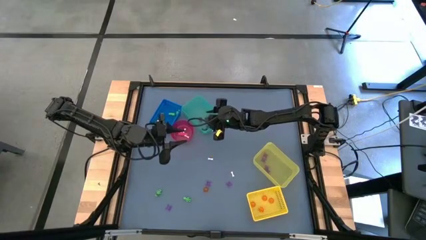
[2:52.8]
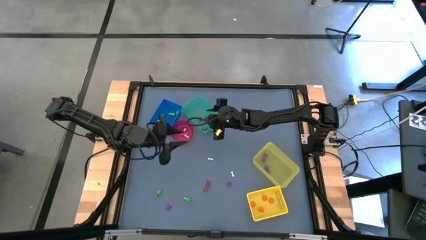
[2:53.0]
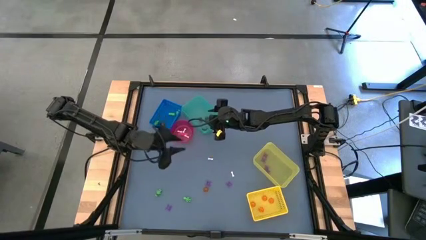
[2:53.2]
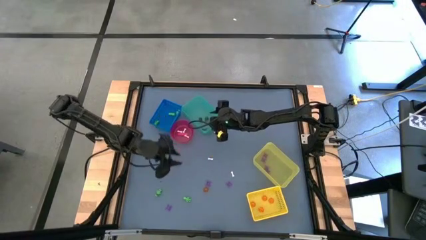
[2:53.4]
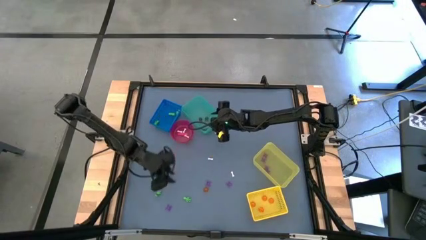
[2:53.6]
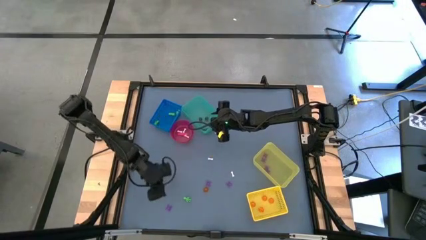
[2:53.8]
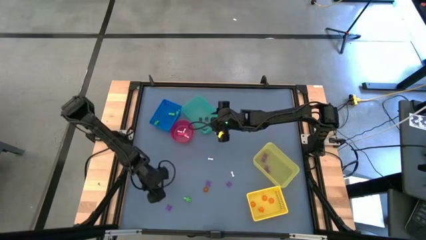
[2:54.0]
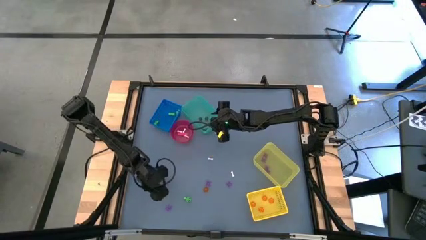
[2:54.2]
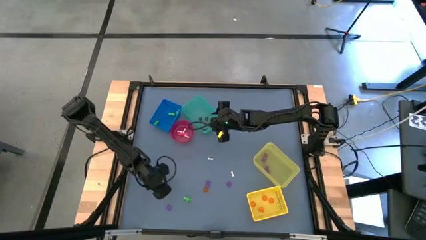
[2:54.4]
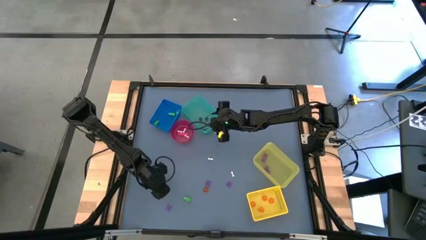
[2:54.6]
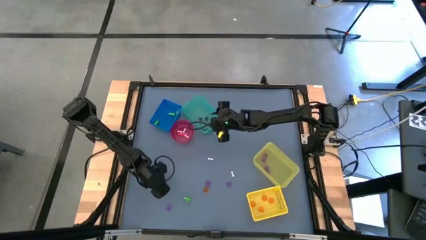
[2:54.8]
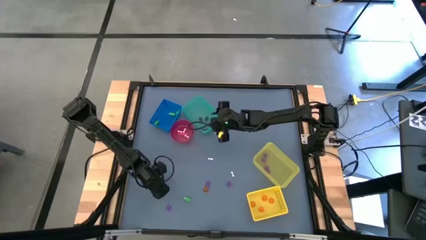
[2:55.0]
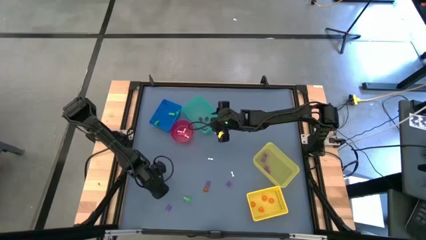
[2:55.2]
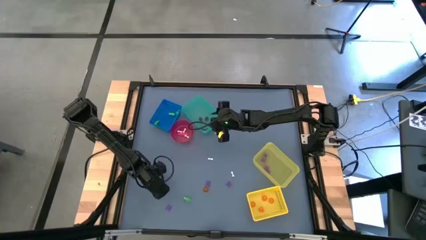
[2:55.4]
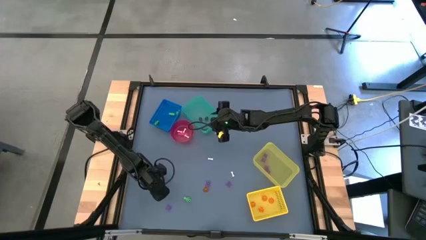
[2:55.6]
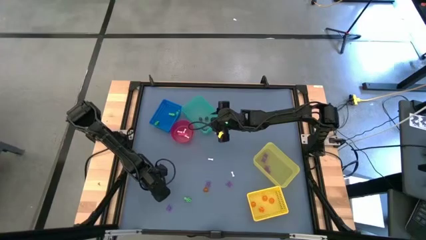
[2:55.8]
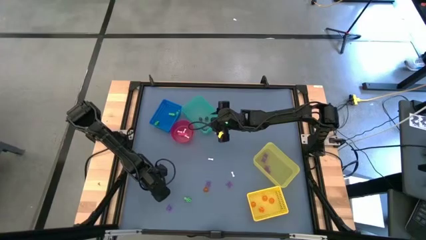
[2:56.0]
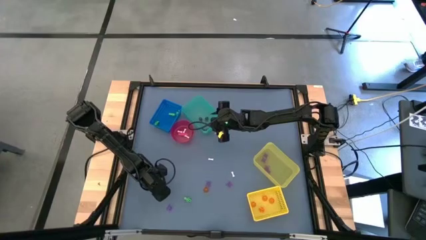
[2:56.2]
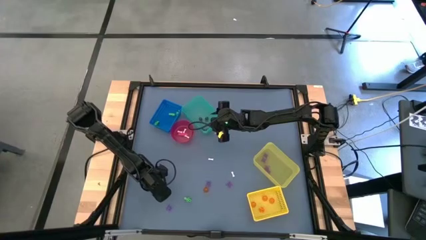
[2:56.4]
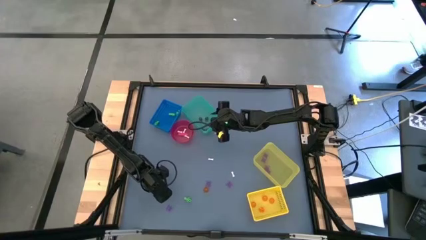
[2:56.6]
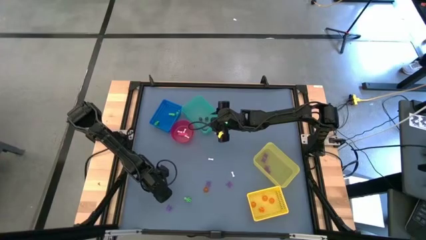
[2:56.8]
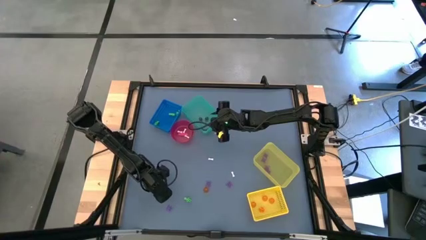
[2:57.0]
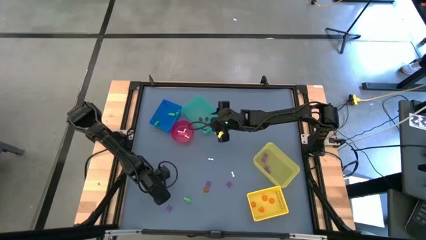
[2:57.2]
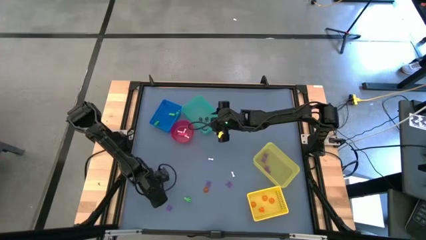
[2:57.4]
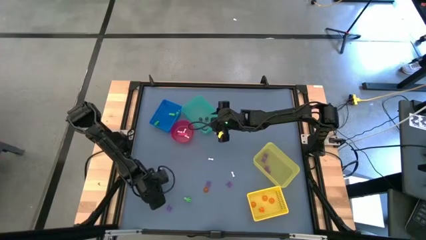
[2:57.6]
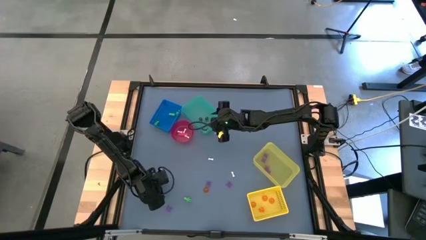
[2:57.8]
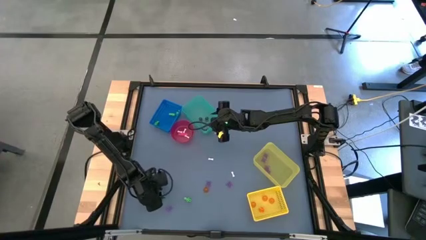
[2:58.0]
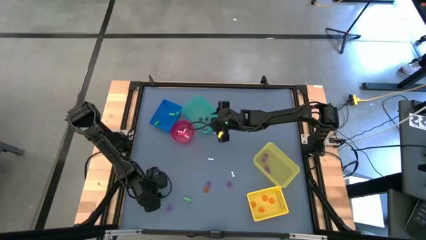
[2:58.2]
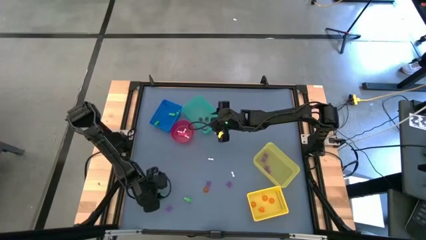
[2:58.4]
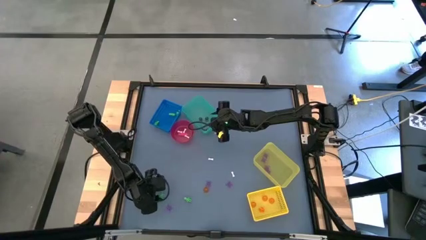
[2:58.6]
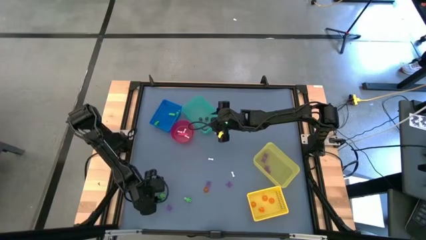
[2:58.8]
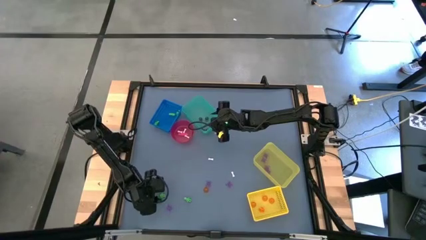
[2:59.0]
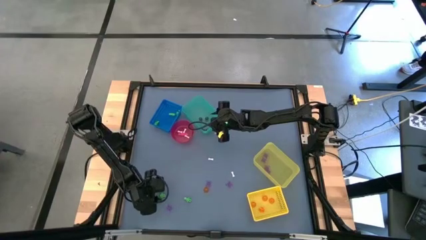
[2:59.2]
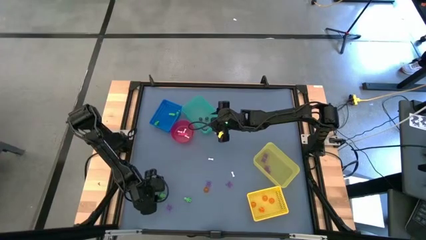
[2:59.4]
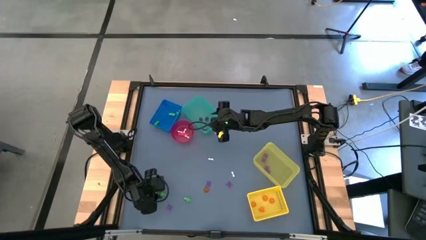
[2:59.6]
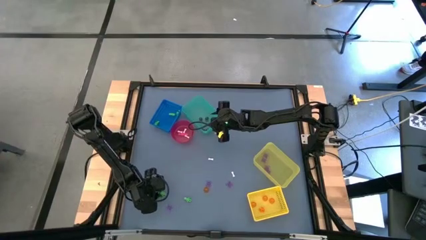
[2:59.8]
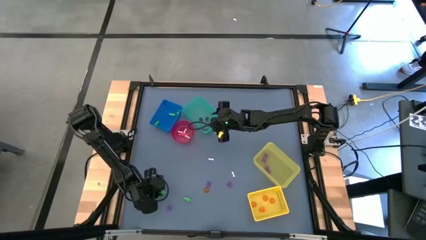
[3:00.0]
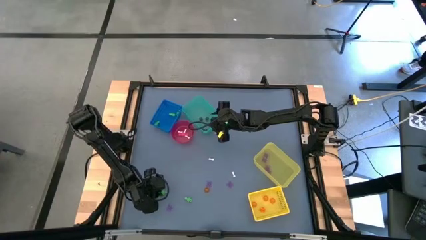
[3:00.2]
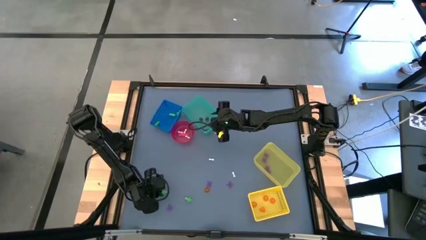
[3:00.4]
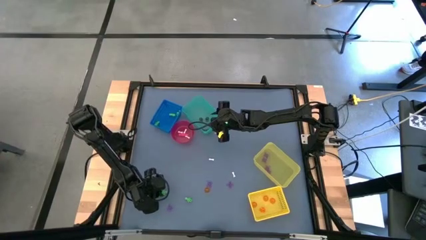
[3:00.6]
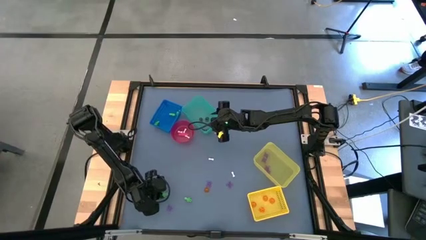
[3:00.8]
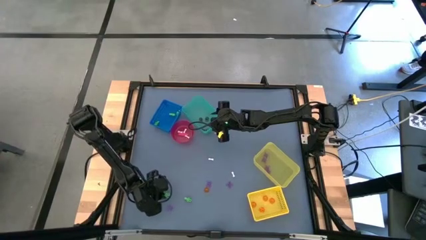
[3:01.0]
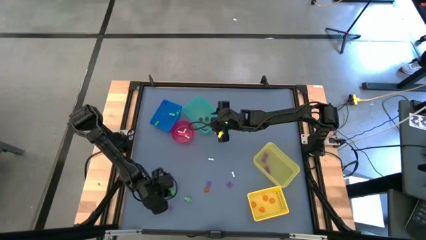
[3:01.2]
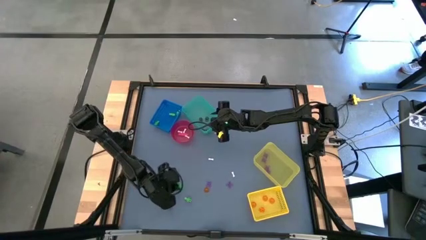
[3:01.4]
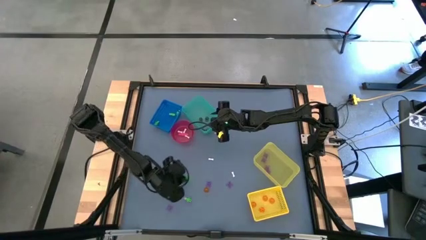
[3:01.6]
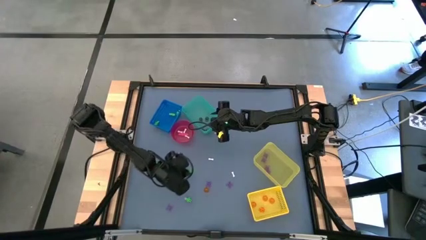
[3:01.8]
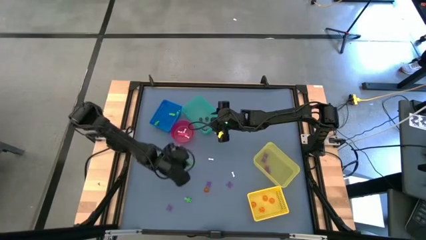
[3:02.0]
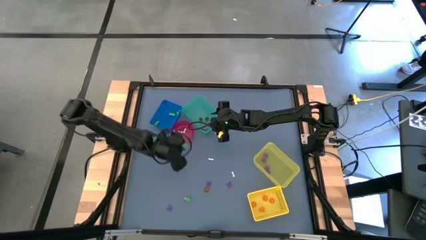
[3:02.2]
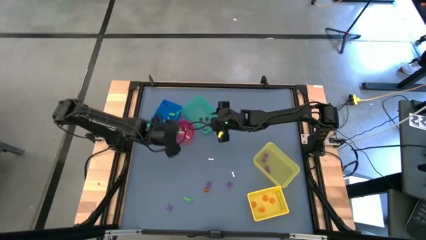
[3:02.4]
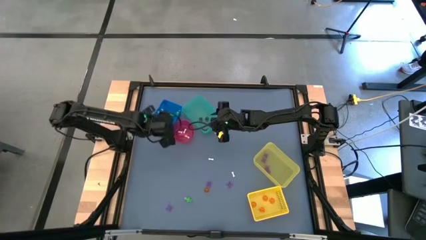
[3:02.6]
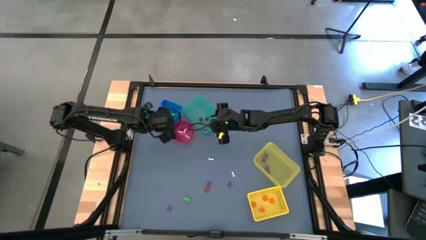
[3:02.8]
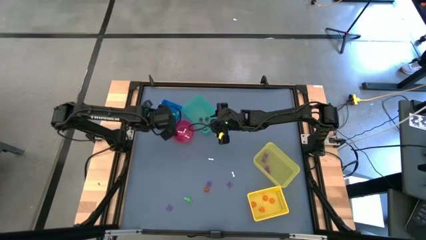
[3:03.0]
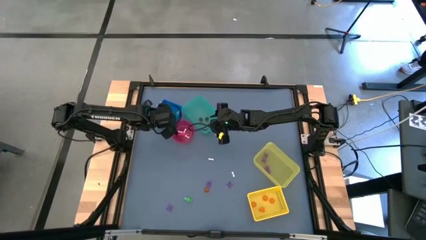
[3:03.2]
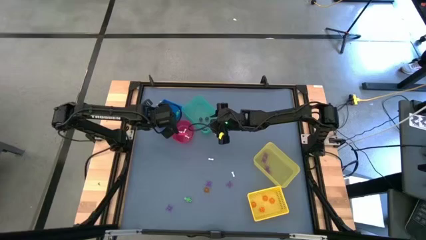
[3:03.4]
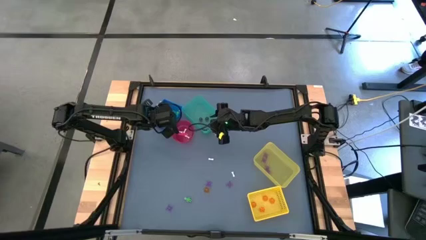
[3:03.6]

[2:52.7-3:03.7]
Task: Sort Halloween decoration
Put the green skeleton toy into the blue bin

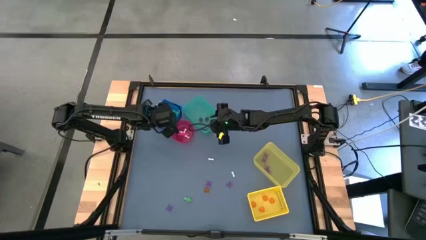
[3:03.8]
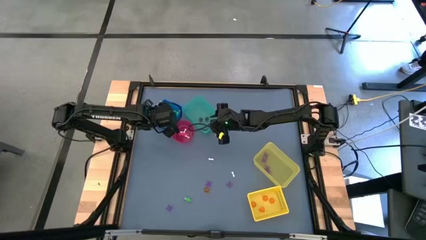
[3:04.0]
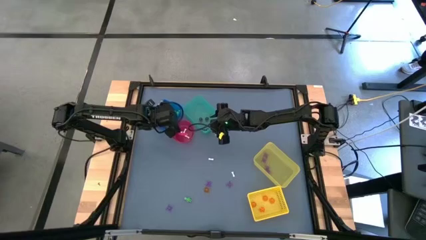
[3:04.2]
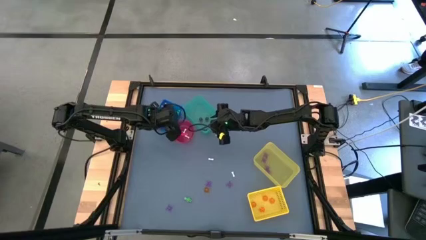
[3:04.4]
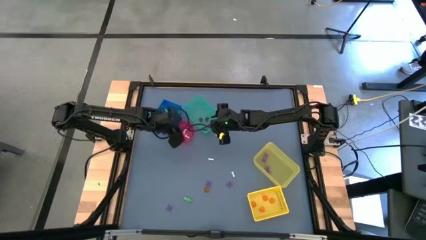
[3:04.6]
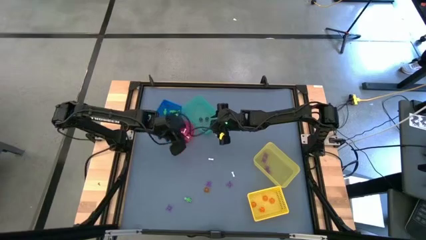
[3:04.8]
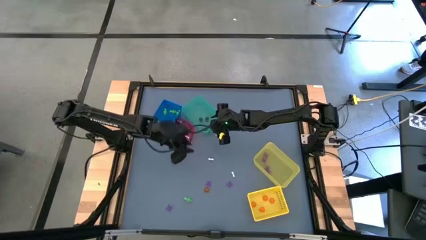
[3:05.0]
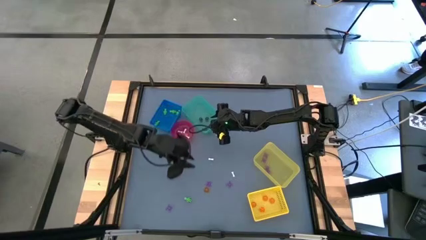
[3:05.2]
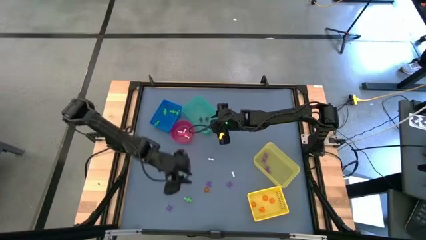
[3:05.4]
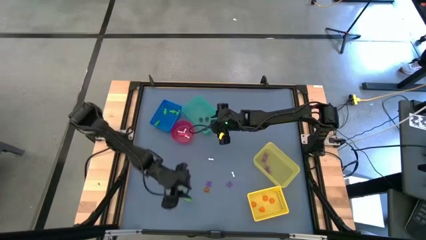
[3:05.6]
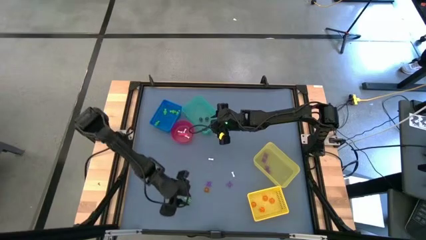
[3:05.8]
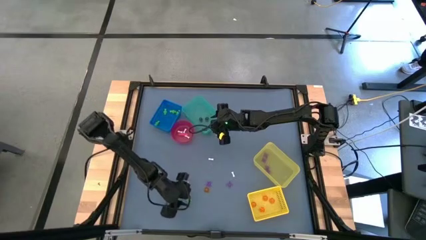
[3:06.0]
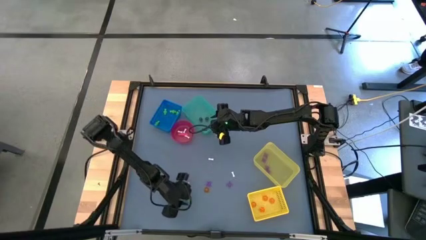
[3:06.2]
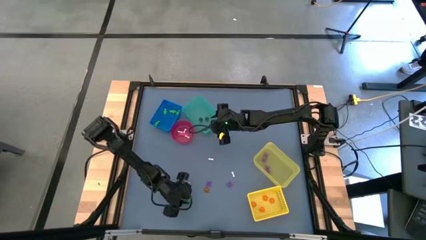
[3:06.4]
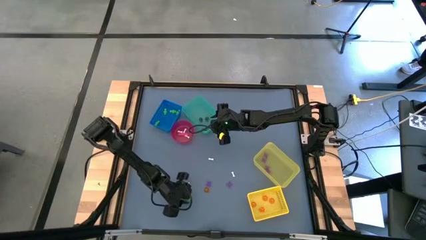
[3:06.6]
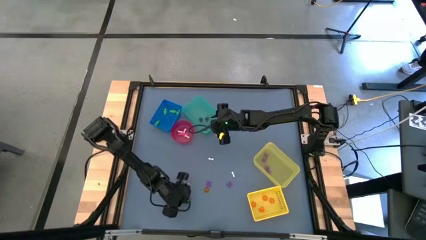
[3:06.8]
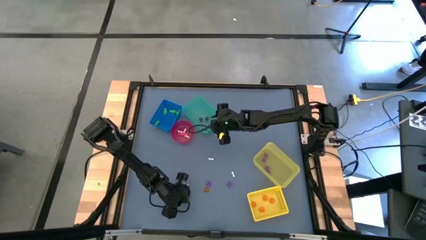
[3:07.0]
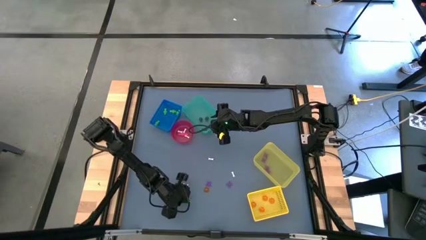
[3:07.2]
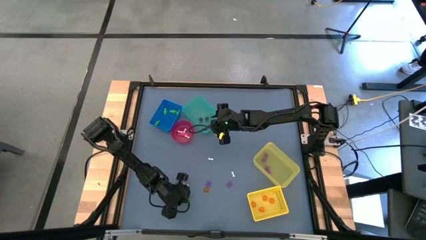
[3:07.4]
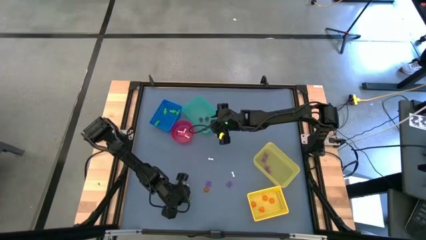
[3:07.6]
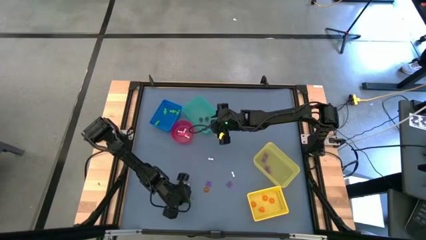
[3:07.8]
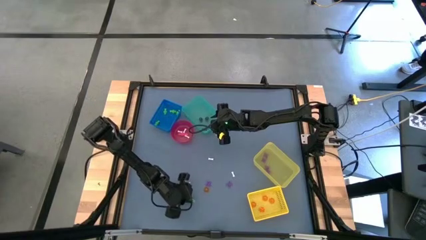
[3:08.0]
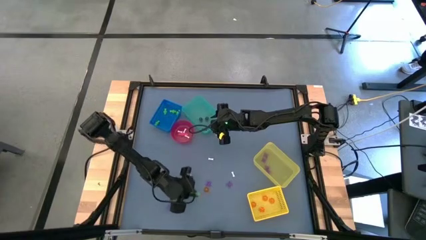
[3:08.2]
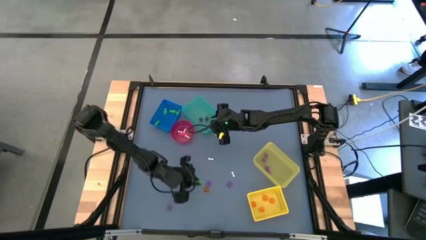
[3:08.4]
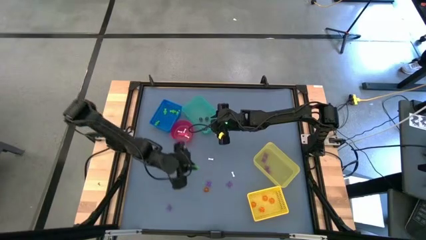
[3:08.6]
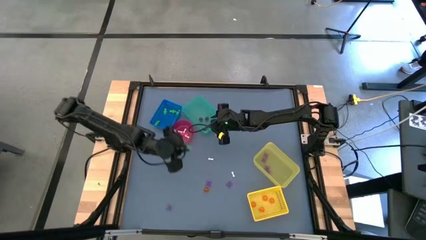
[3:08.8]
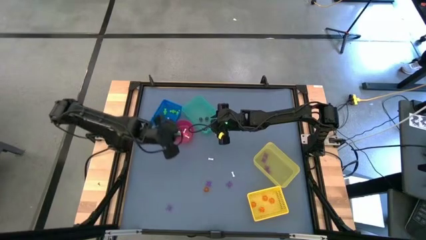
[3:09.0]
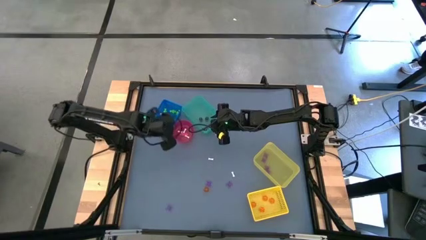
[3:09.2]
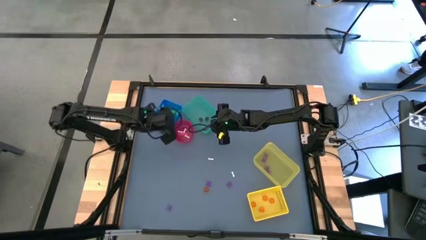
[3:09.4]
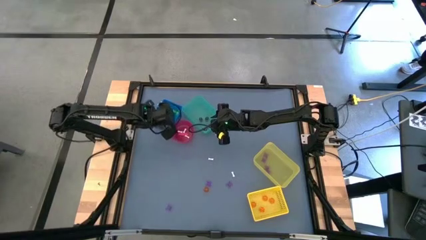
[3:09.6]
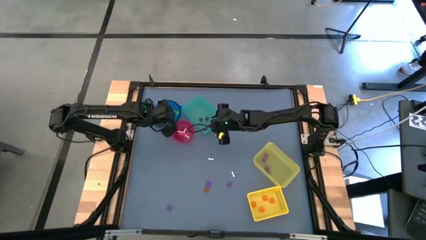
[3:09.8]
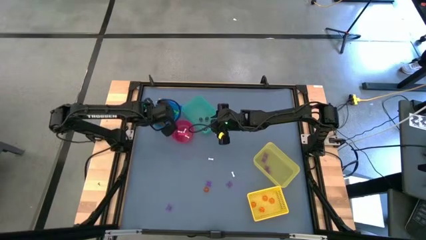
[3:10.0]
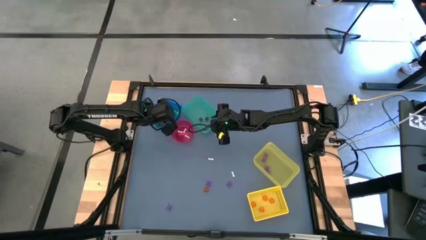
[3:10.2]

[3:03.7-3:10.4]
Put the green skeleton toy into the blue bin
